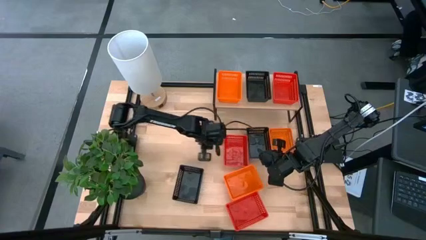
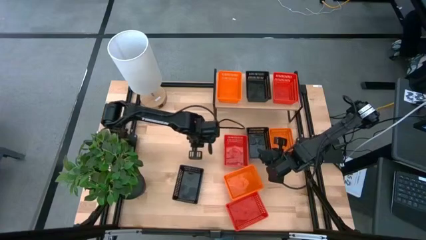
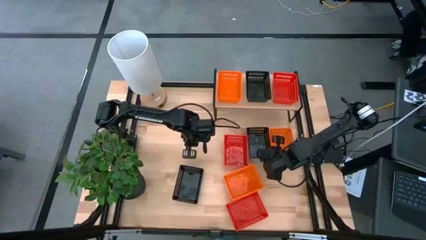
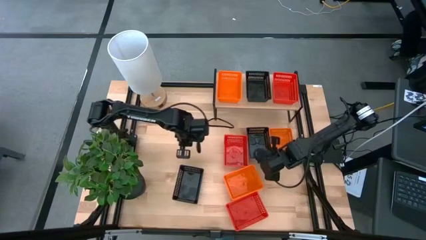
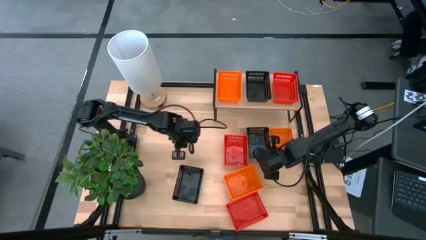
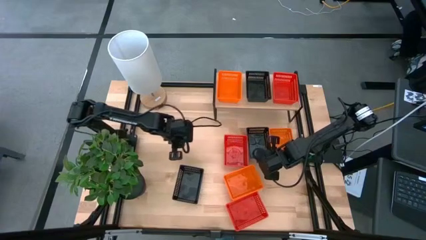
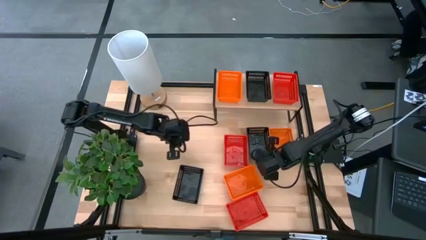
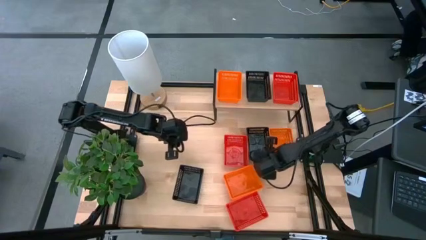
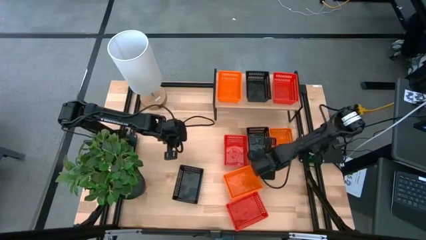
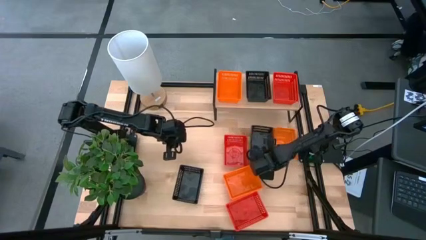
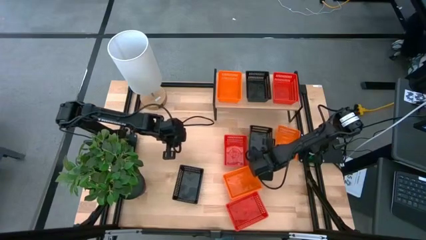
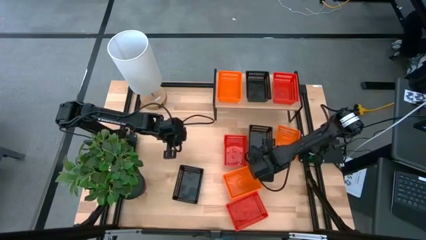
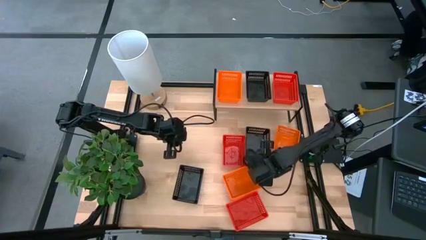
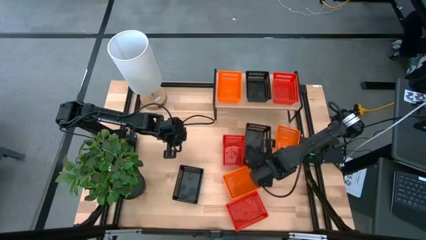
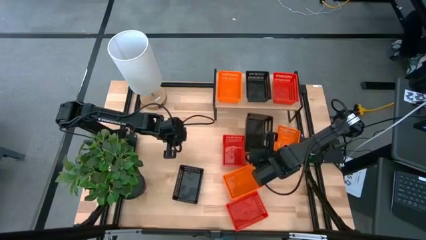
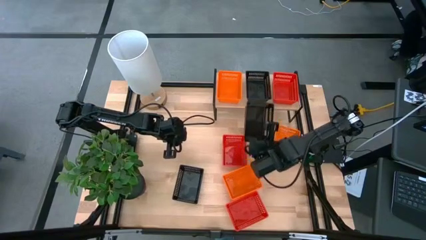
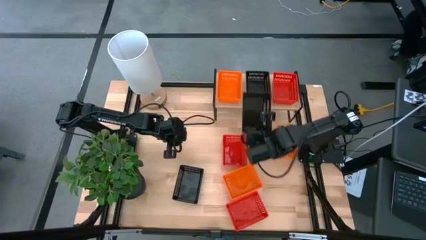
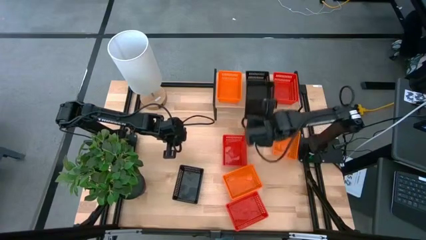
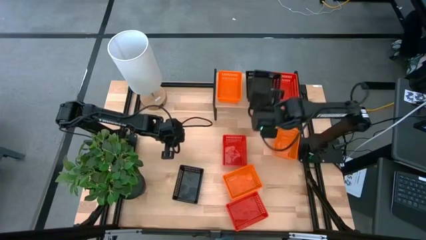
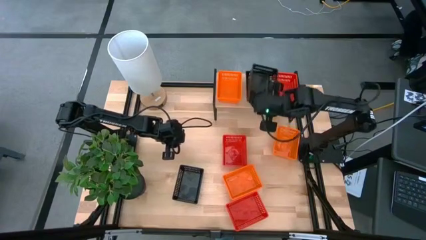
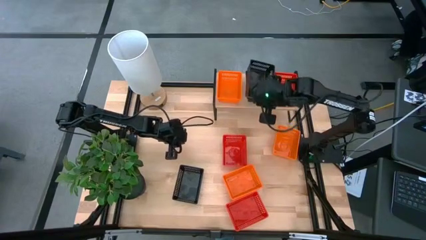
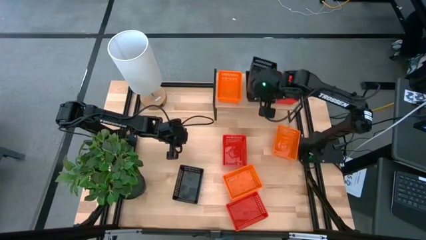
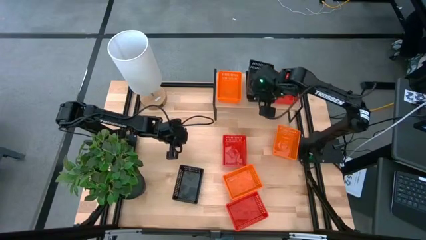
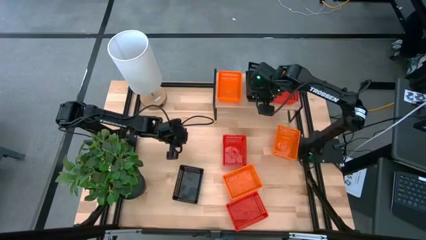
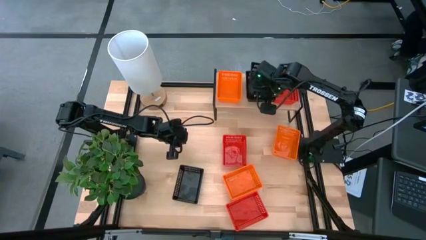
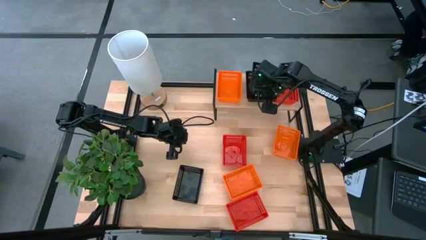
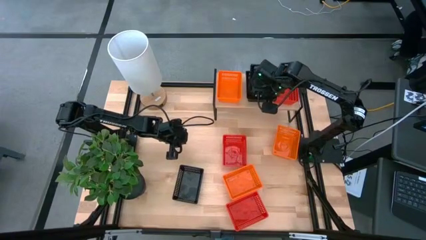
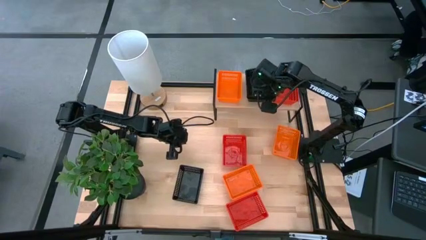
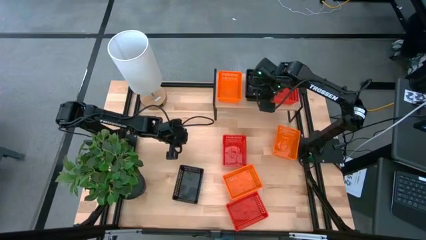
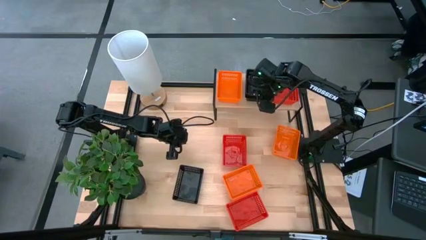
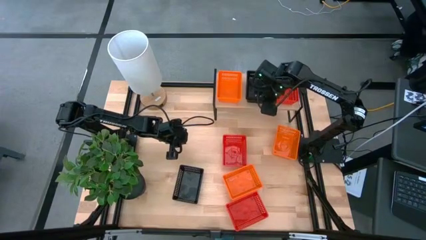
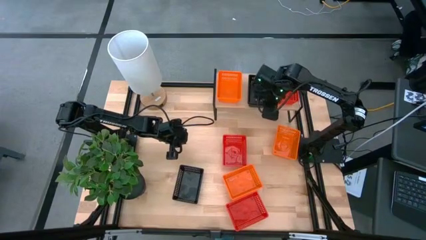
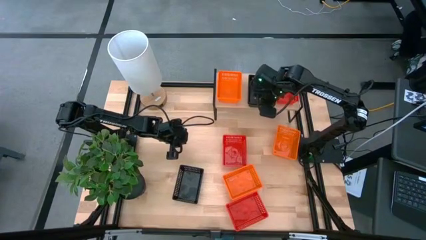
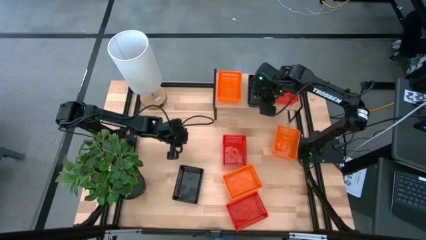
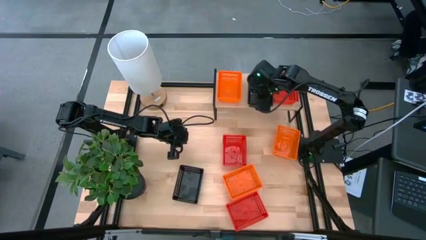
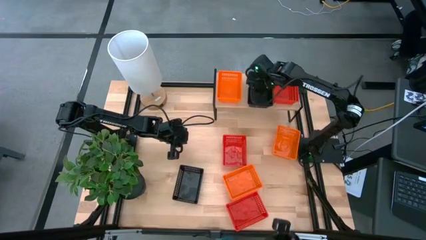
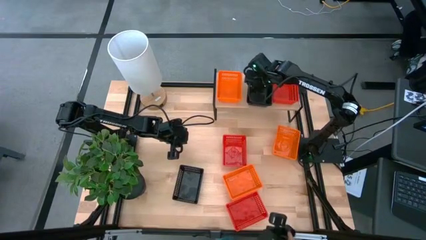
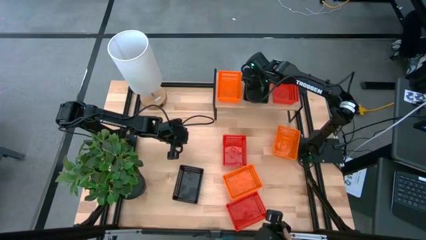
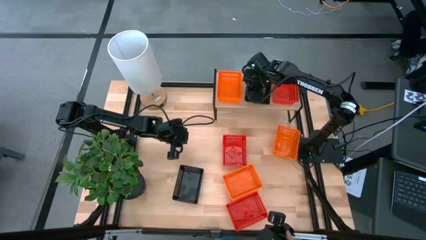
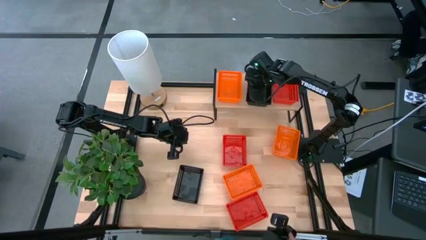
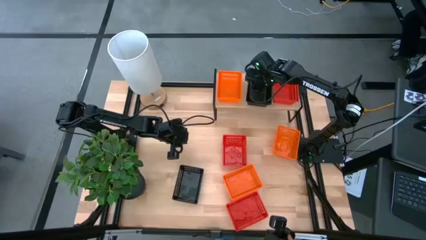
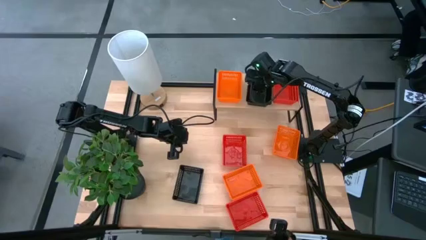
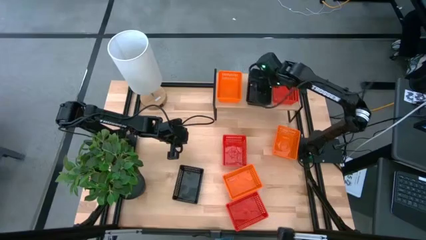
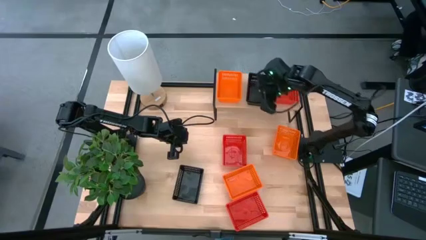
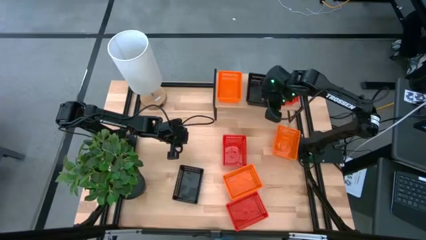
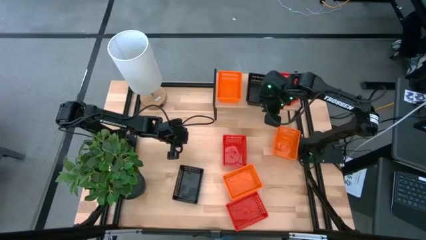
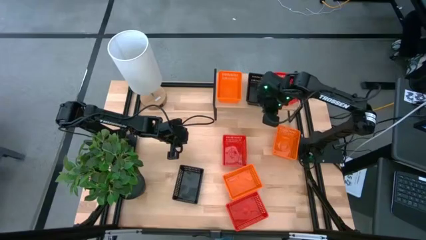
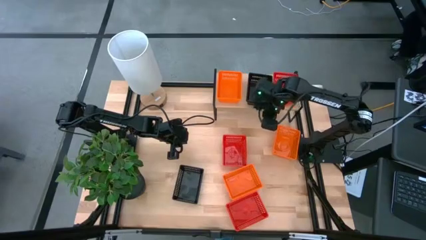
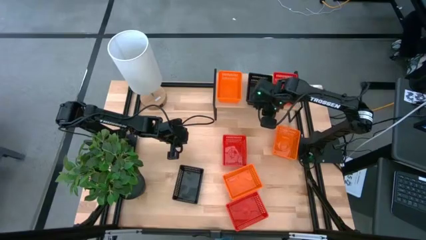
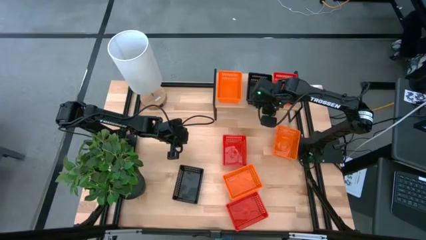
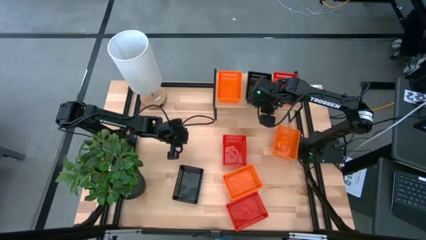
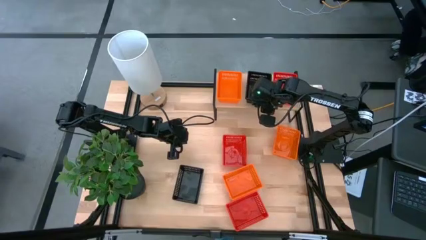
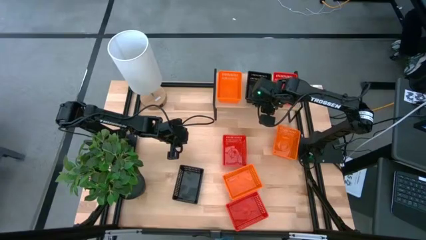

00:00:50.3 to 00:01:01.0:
Task: Stack baskets on shelf by color
Stack the top black bin on the black bin on the shelf

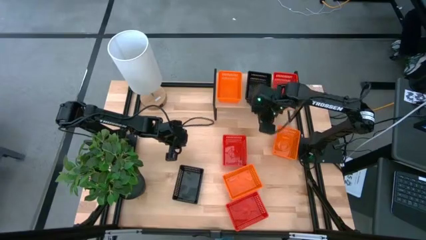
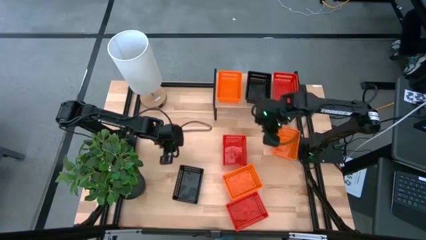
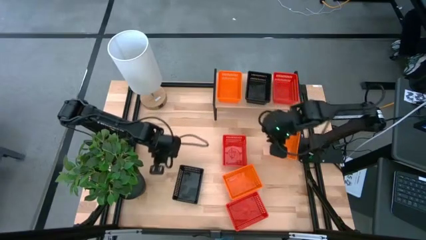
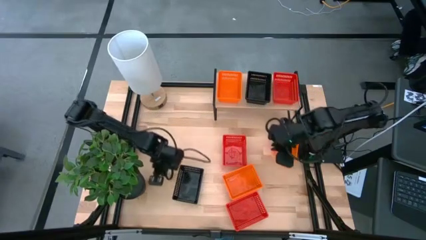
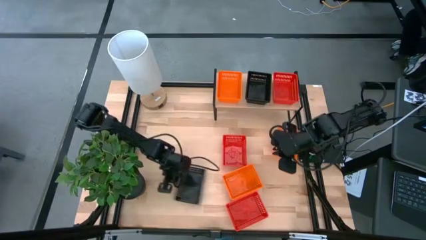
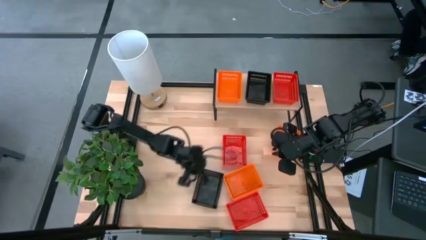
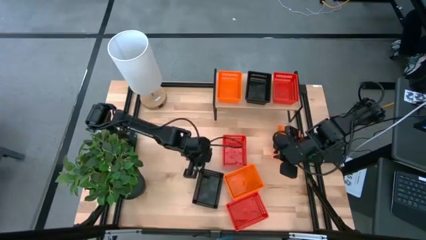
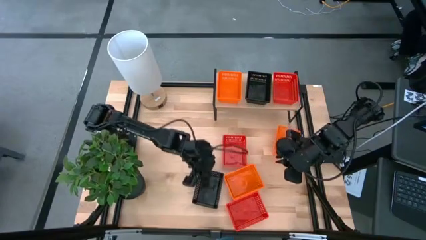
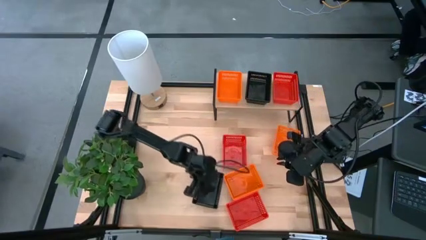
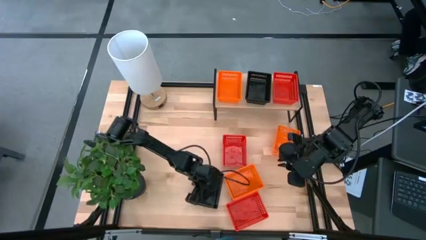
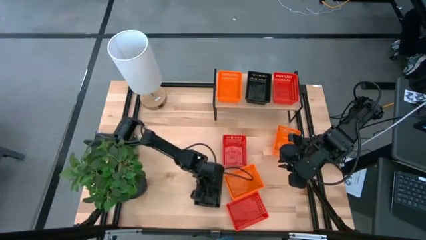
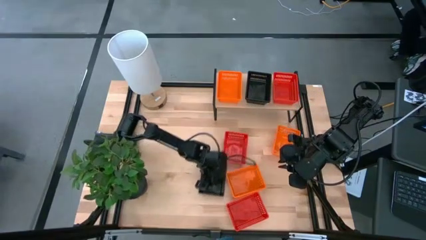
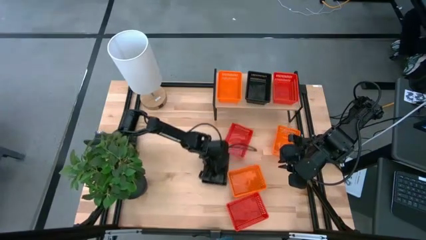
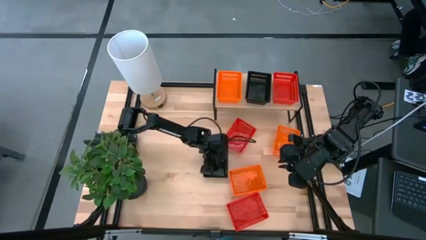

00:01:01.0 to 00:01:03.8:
Adjust the black bin on the shelf
